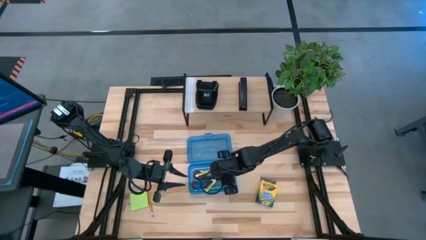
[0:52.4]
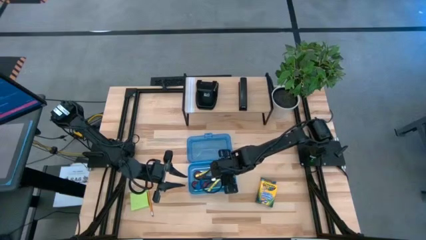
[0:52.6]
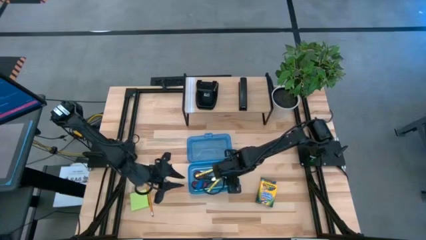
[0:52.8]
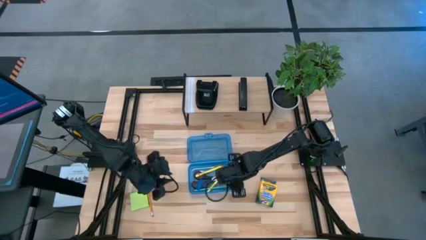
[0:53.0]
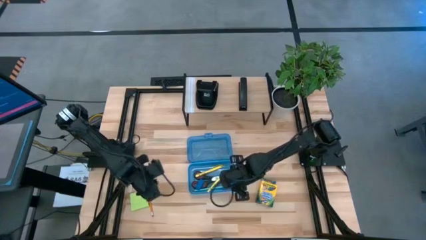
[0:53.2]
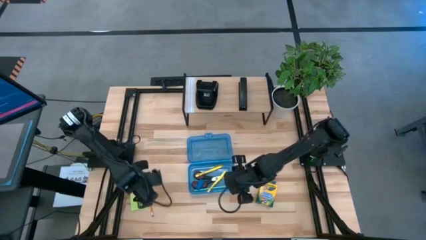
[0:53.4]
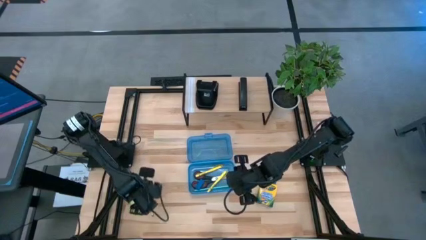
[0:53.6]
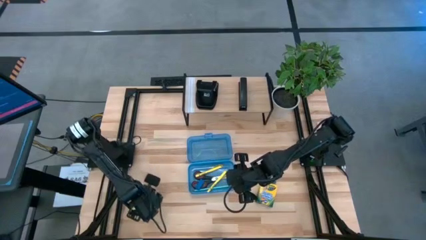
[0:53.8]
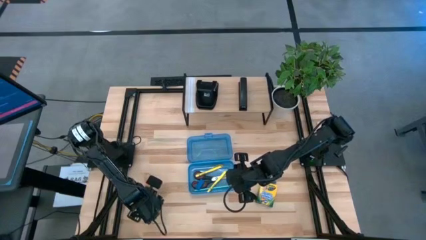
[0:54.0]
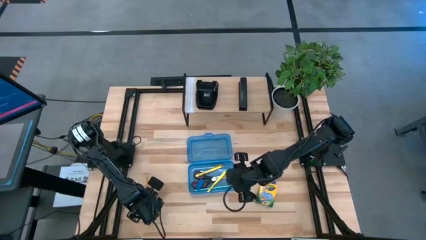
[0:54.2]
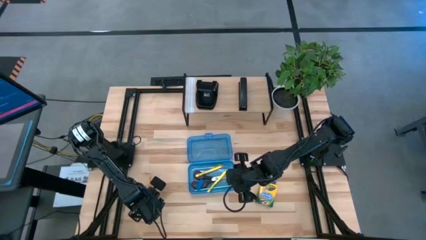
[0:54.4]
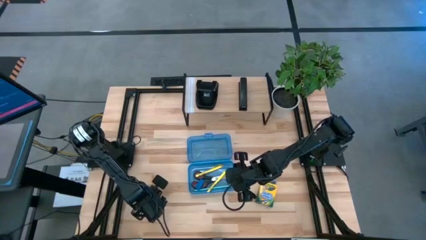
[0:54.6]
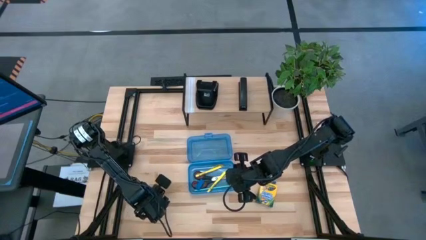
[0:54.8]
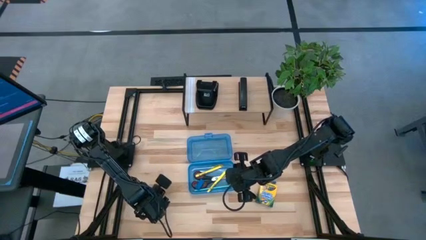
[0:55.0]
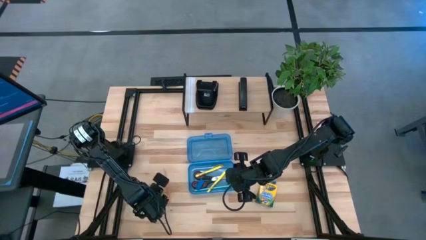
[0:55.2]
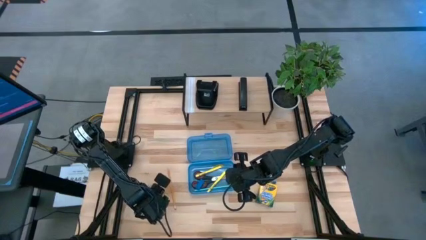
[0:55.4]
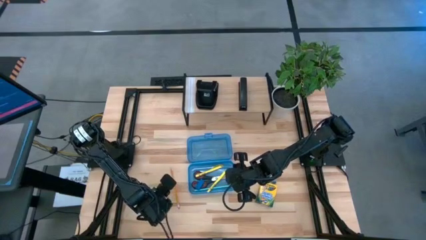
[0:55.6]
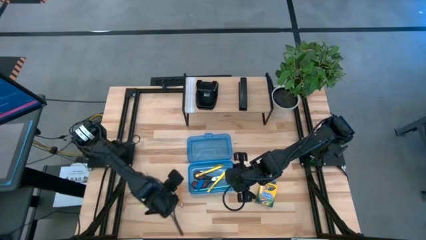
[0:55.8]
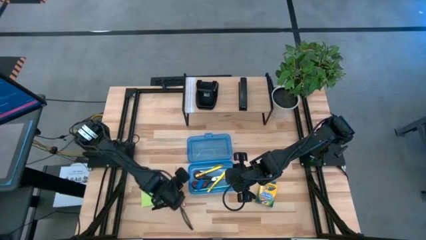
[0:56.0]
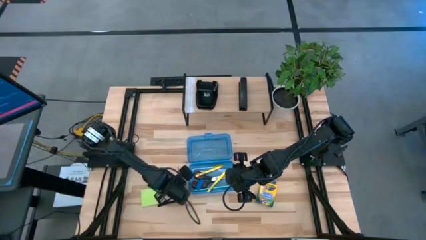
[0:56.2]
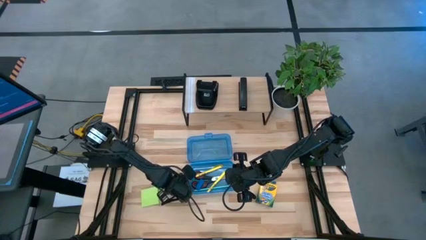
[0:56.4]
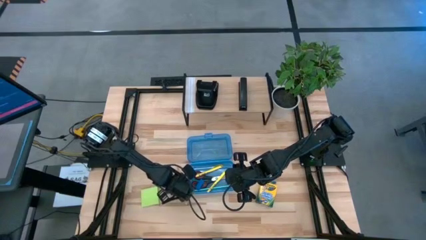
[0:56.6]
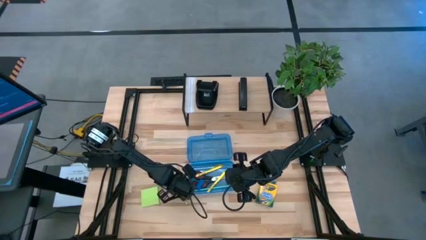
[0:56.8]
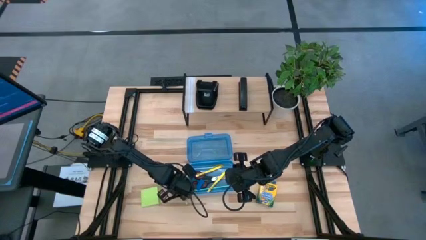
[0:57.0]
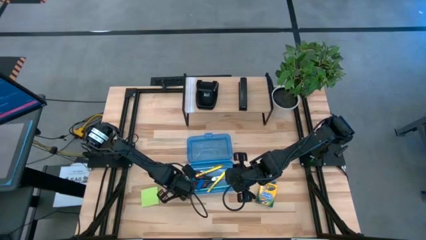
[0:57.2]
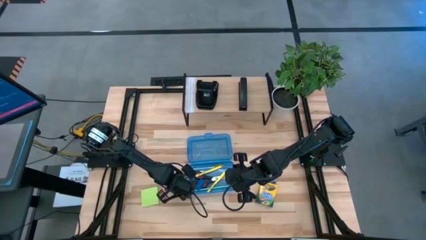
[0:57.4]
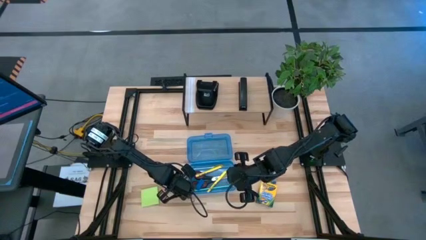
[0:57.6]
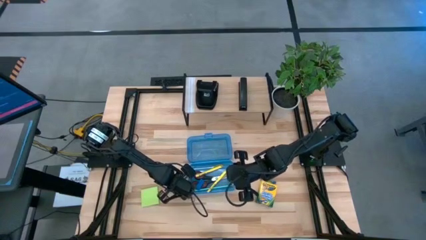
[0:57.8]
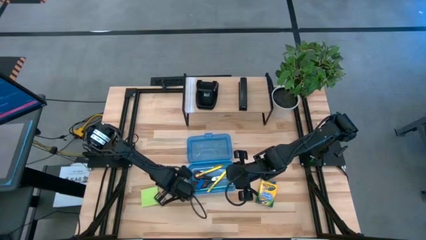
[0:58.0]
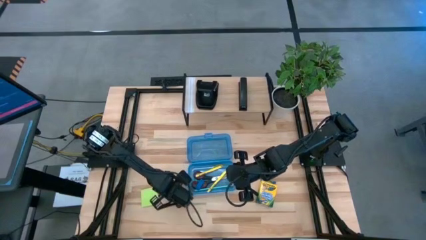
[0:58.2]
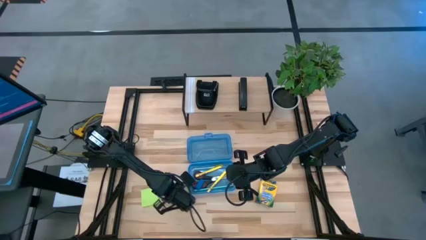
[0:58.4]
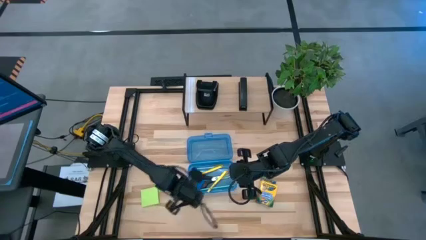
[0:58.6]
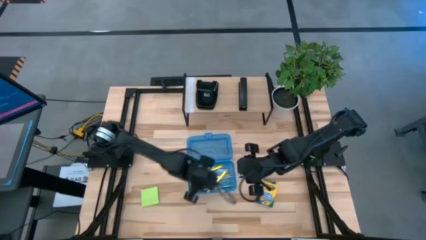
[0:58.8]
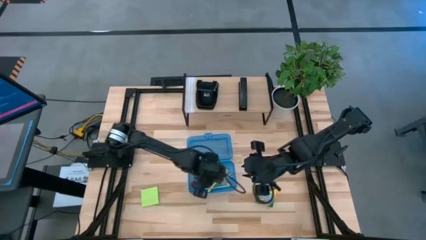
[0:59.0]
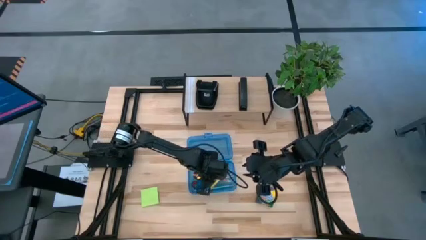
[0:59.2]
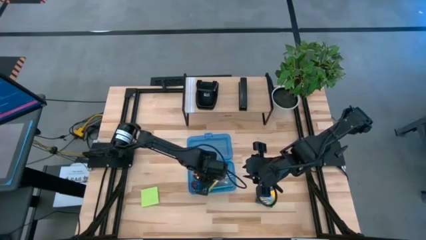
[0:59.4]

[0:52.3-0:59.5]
Task: Pack school essentials
Put the orange pencil into the supply box

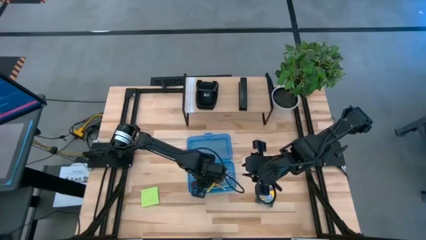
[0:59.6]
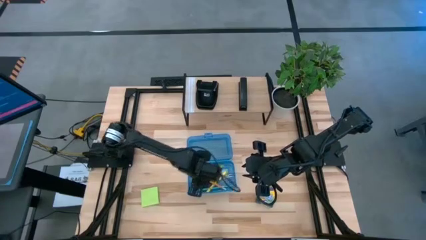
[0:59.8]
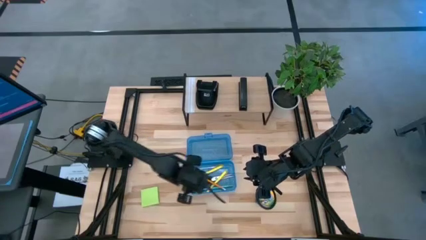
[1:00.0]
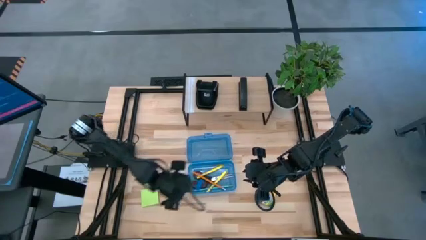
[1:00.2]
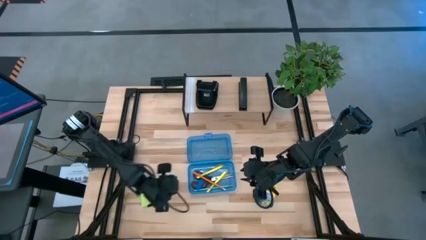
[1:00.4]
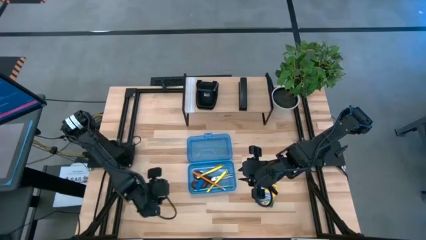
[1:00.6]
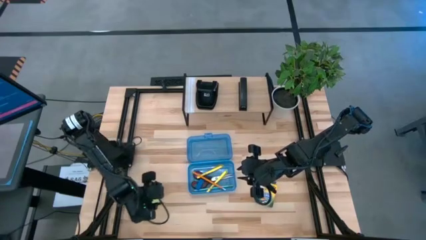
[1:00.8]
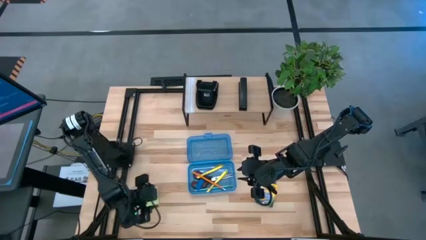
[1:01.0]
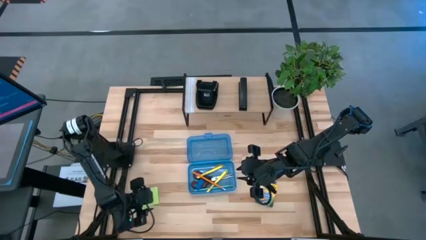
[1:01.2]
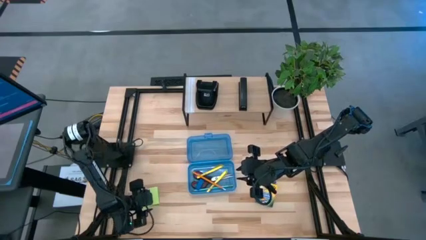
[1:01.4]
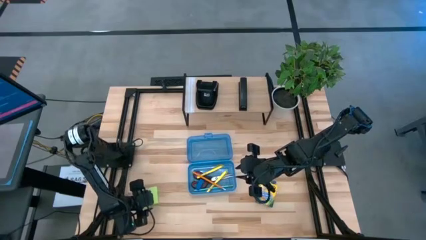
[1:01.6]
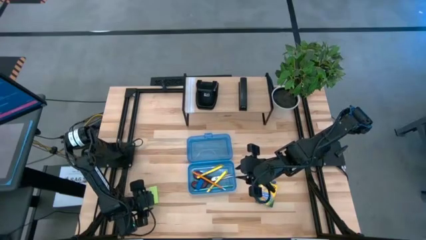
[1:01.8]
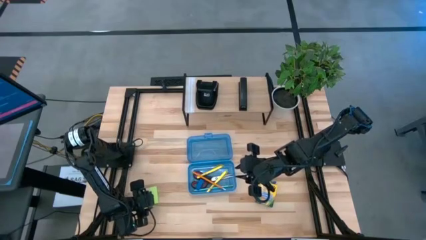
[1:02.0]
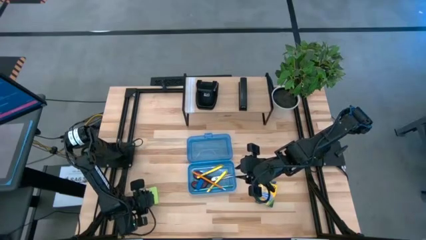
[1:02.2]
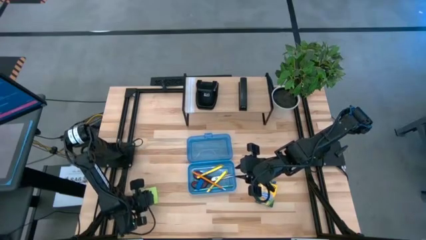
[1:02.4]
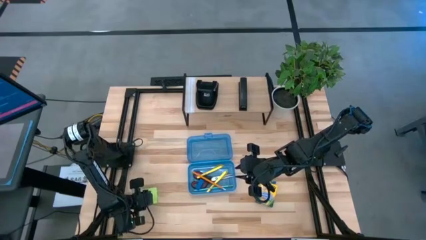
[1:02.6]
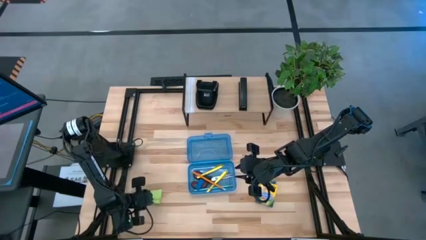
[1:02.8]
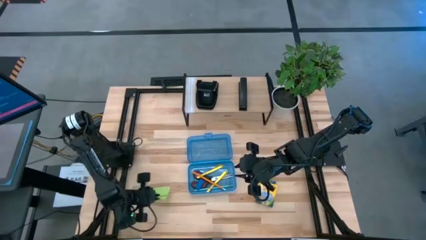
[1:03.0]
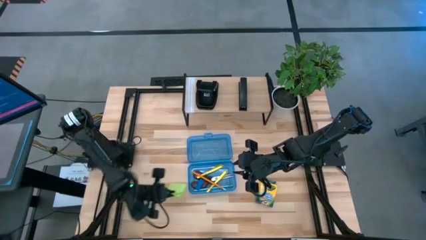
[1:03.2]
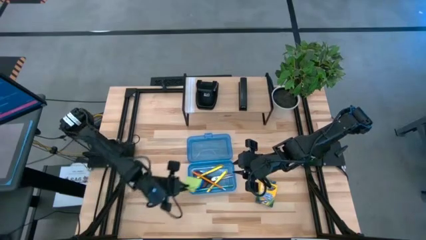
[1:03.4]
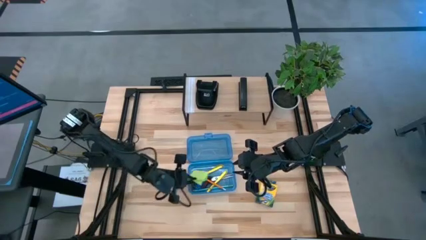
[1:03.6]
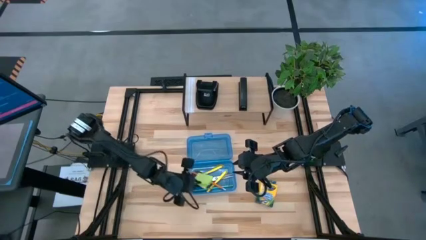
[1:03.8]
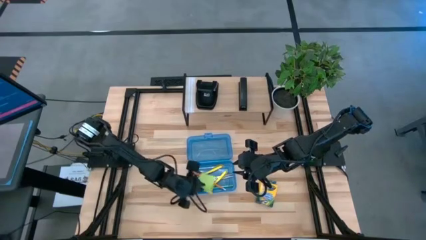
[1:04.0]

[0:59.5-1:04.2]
Put the green sticky note into the supply box

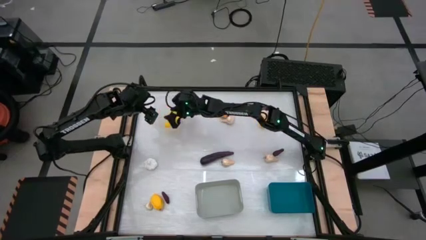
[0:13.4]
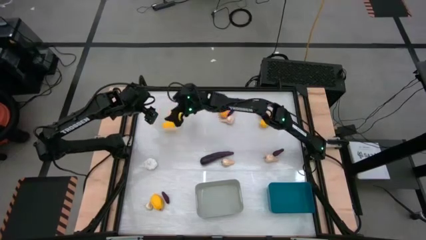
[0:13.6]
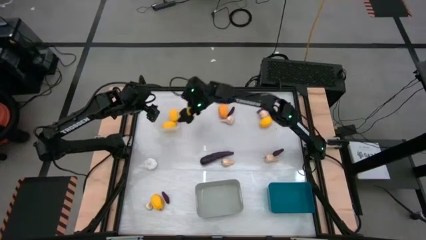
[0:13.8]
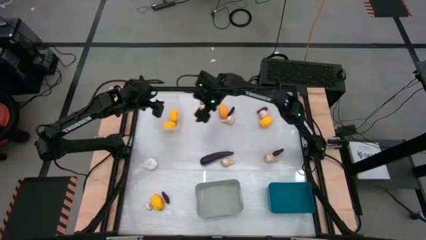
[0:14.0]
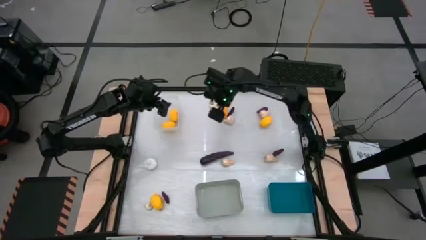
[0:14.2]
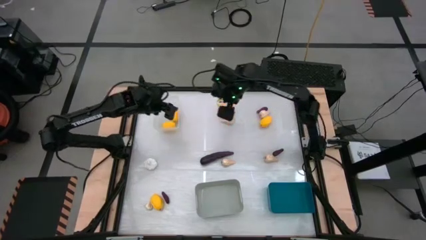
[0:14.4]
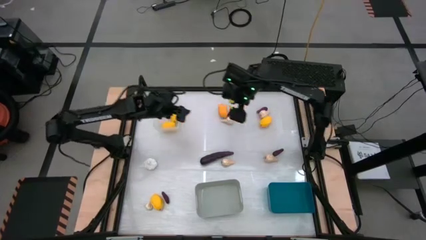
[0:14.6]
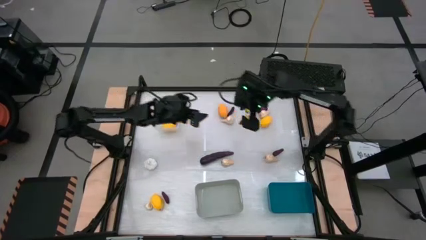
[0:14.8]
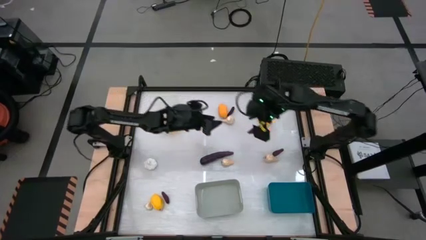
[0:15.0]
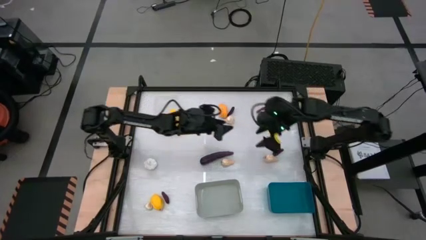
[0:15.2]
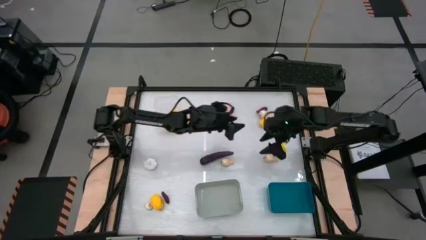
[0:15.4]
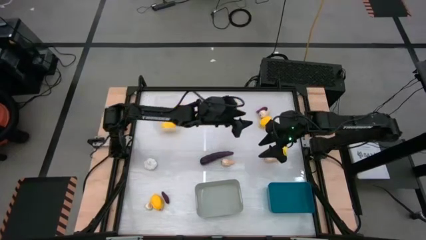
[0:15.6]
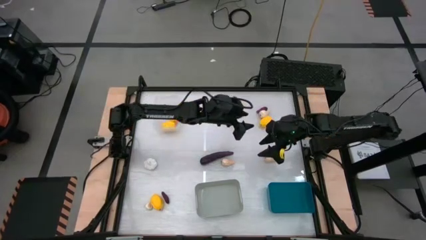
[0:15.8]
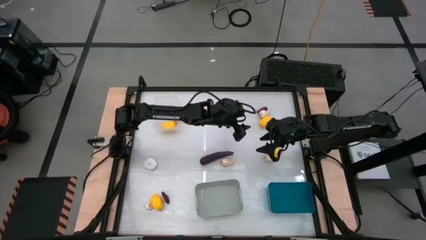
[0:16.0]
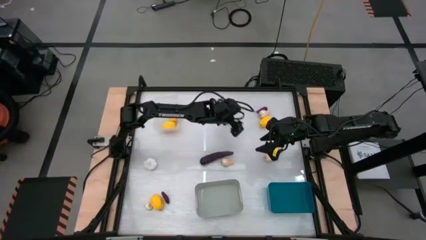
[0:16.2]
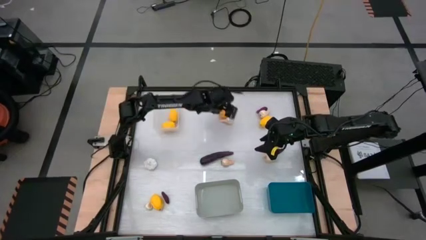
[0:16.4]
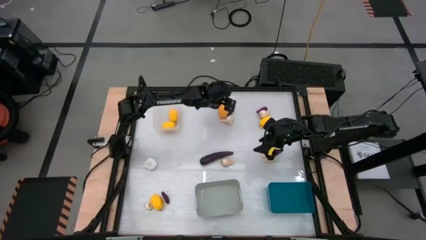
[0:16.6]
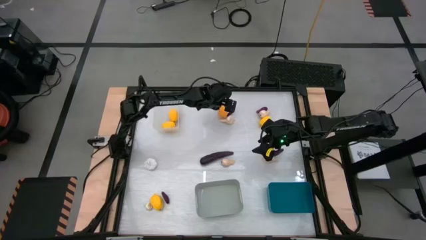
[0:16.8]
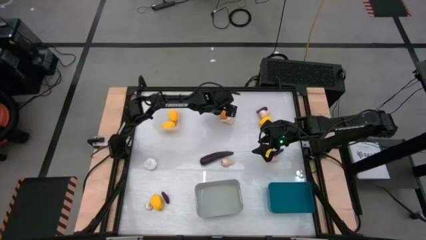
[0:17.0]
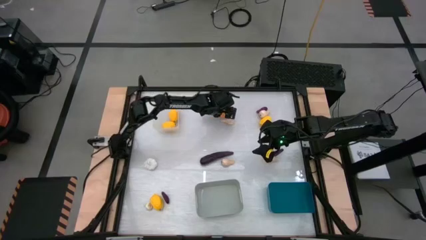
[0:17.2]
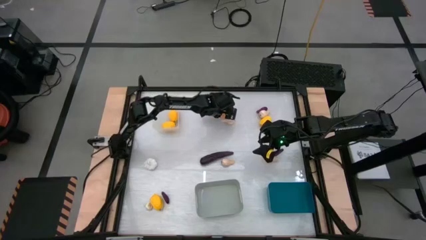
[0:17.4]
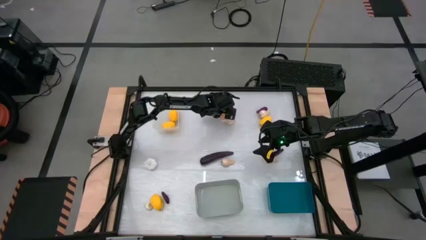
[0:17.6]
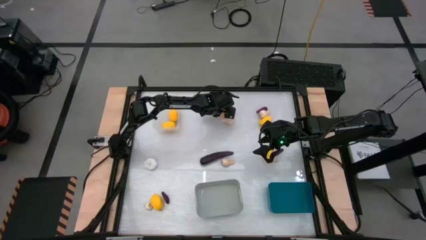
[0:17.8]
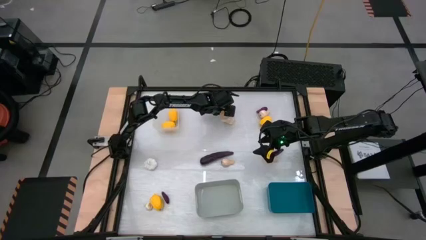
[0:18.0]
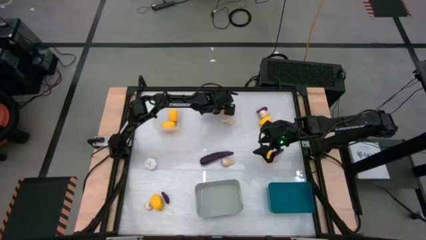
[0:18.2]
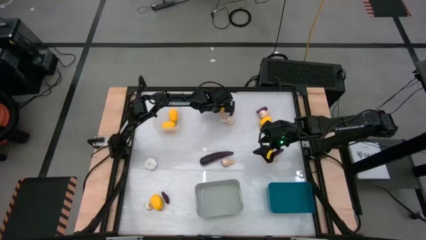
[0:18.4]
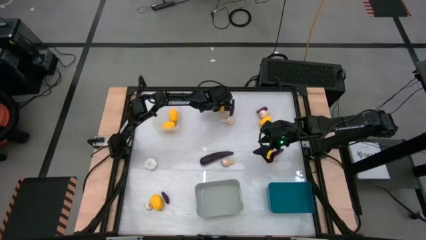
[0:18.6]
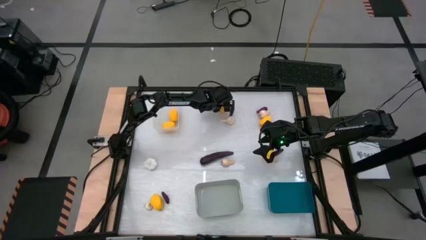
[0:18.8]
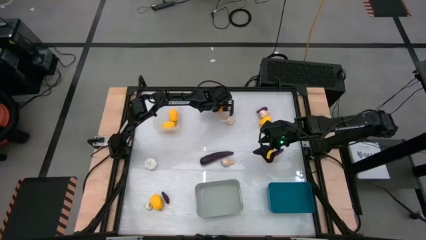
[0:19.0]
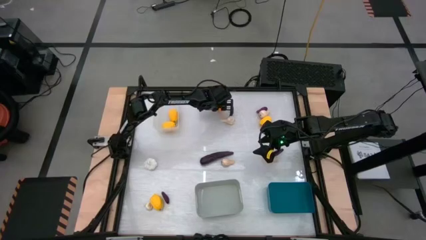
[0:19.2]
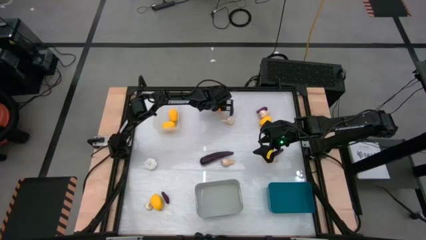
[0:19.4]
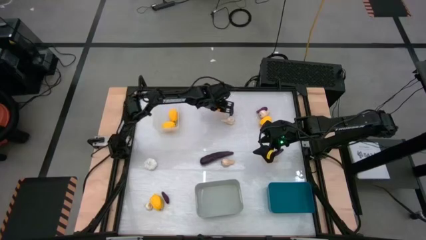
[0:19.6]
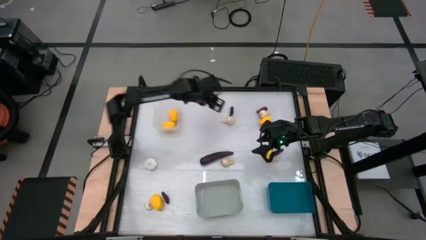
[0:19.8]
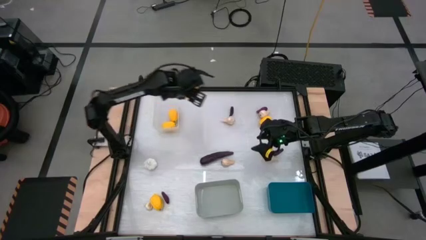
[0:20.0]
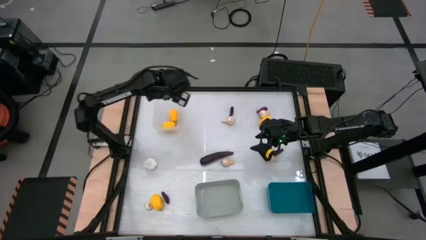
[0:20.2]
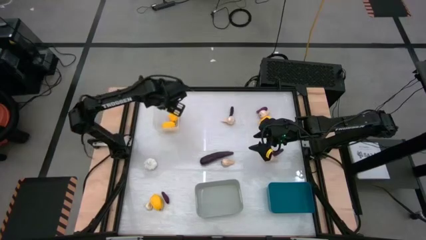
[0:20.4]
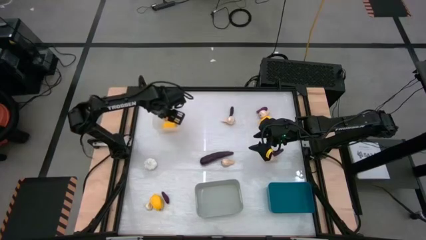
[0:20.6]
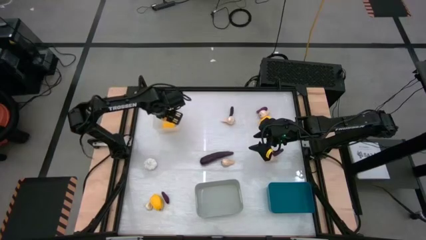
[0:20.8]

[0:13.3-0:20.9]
Task: Sort produce into baskets
Put the lemon into the transparent bin
